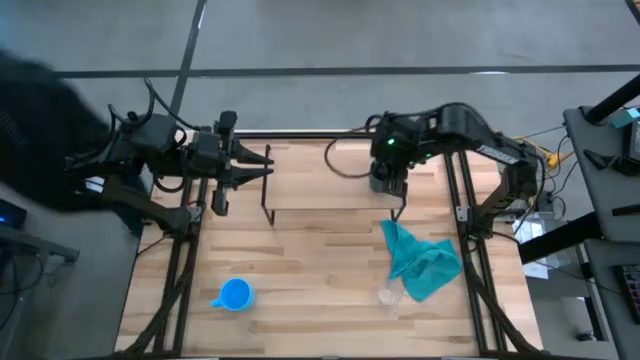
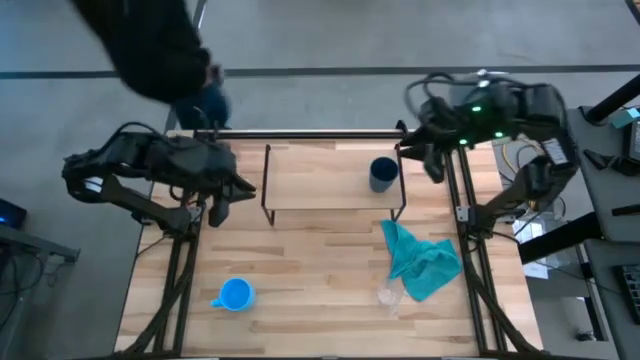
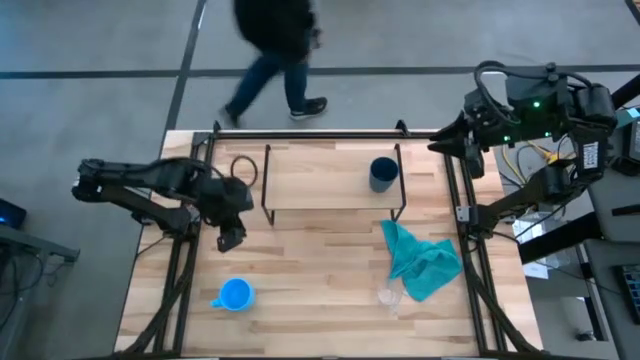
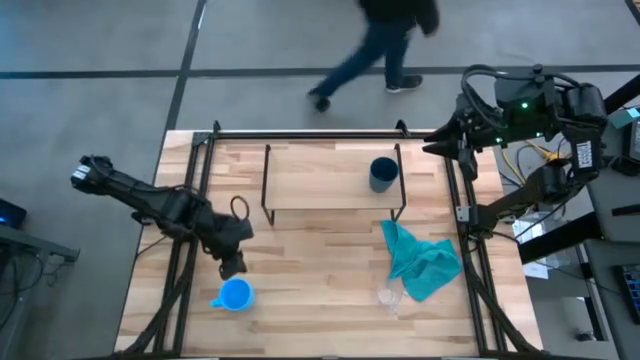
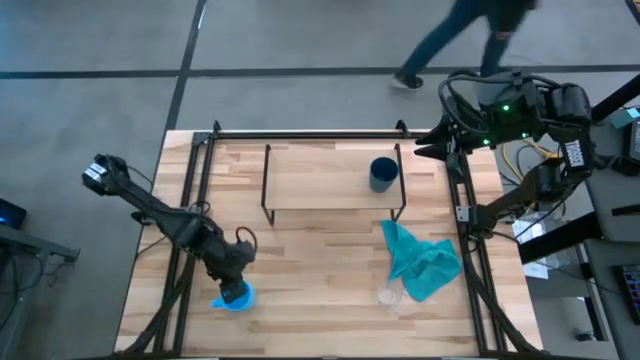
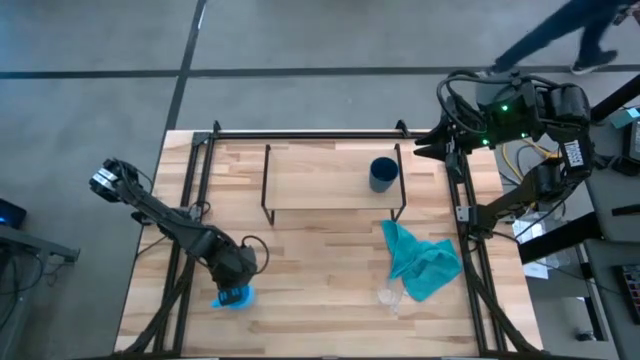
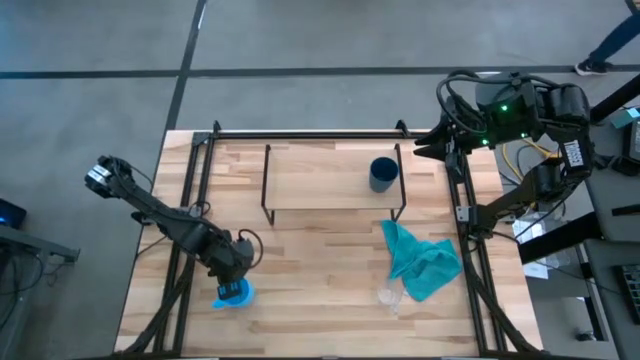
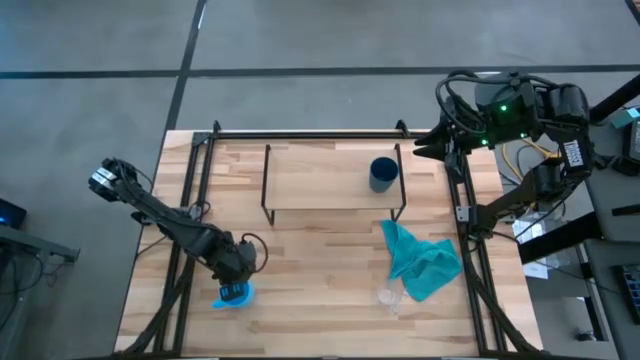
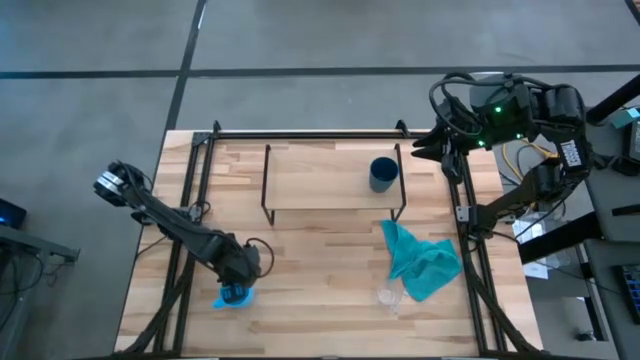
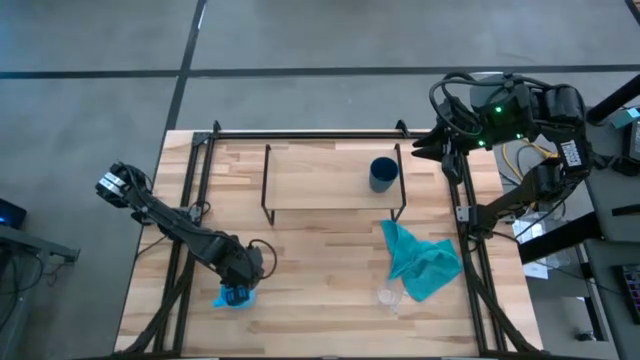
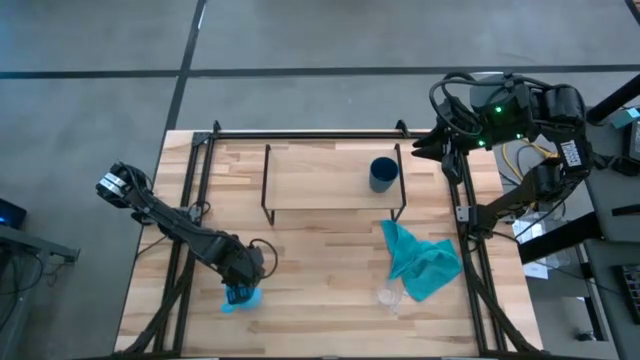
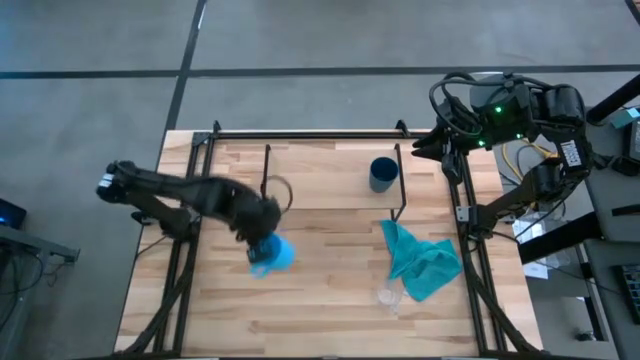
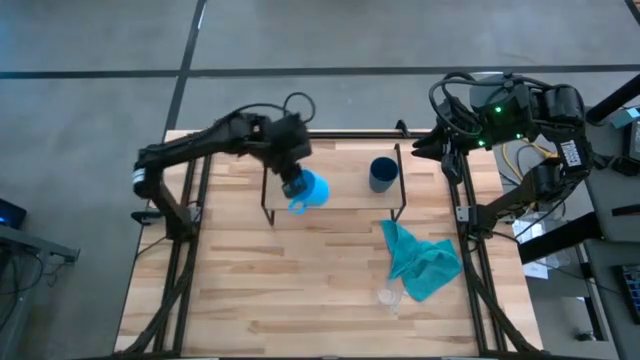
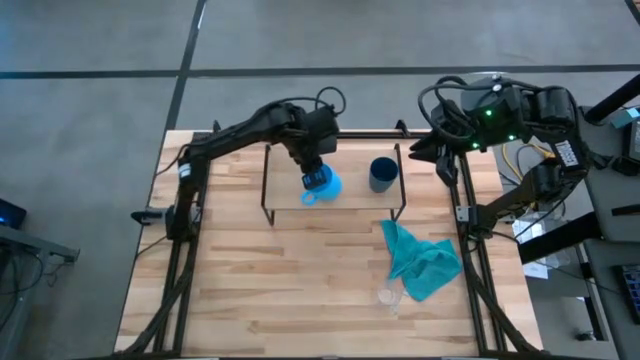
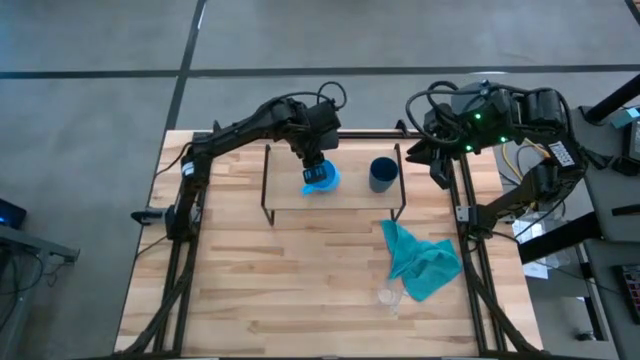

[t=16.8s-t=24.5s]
Task: Stack small to large cups/mugs on shelf
Put the light blue mug on the shelf

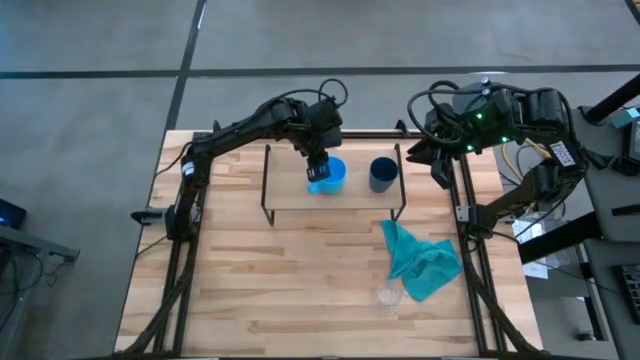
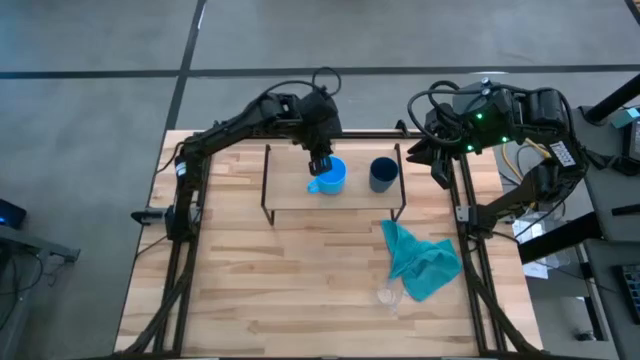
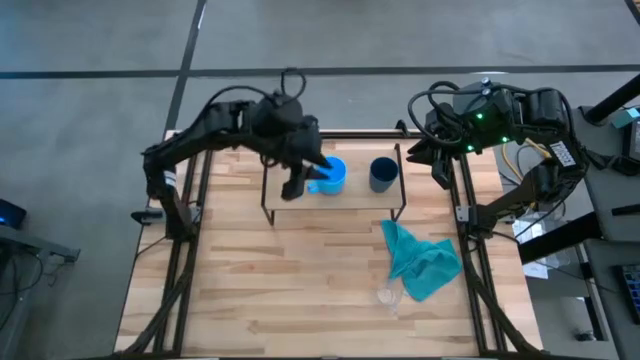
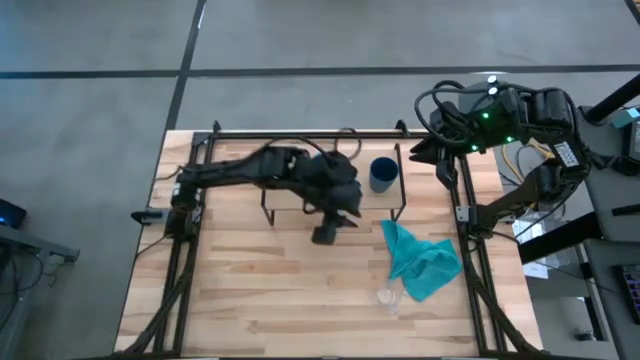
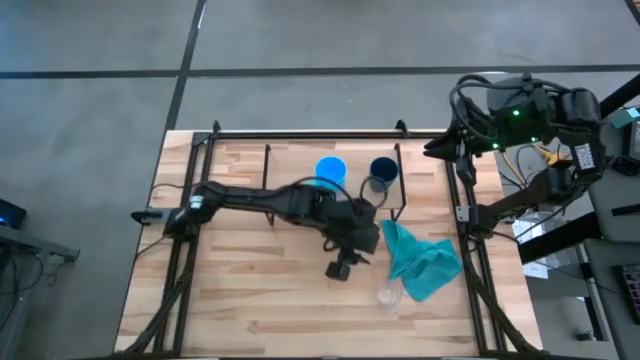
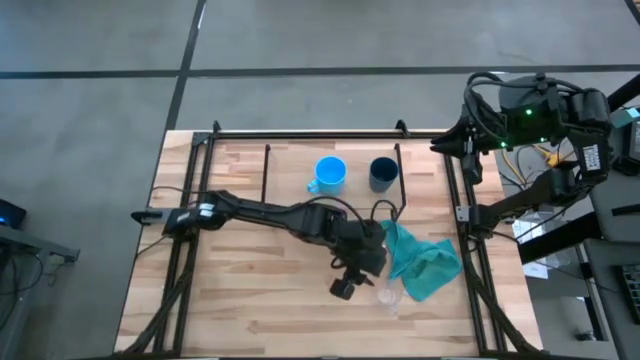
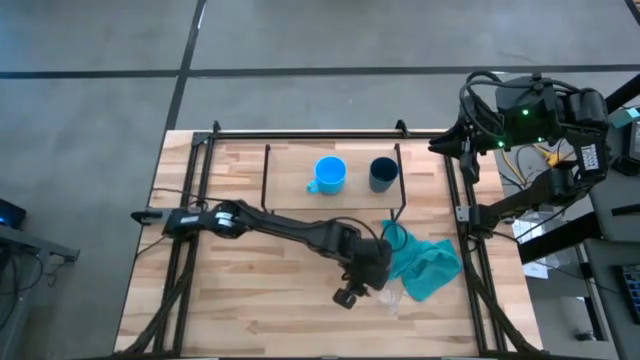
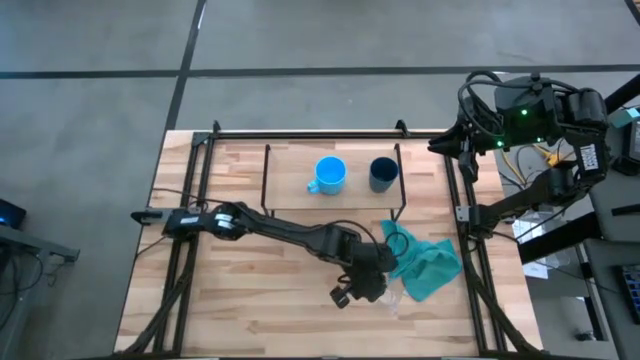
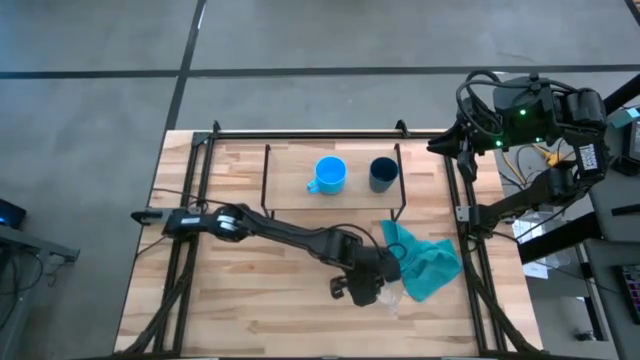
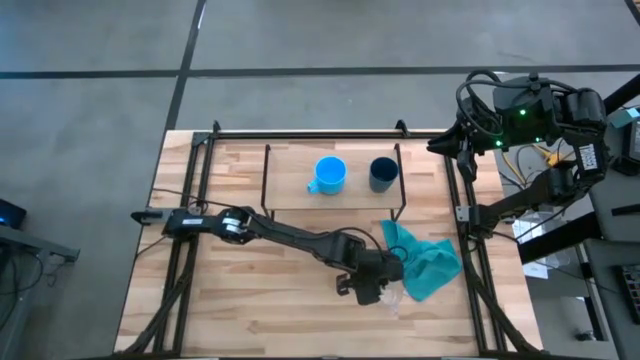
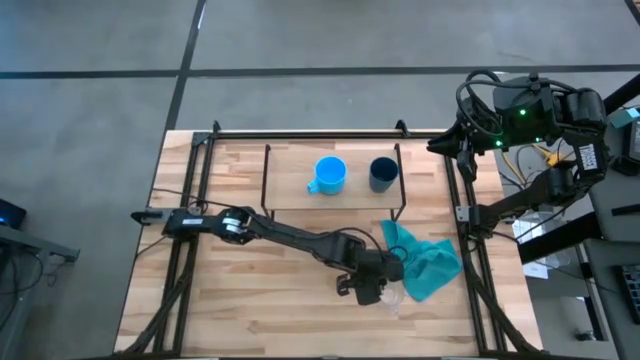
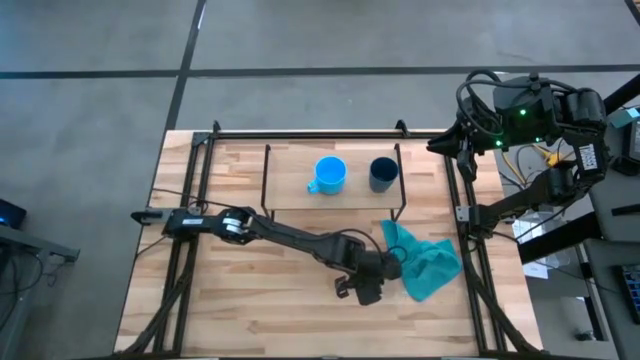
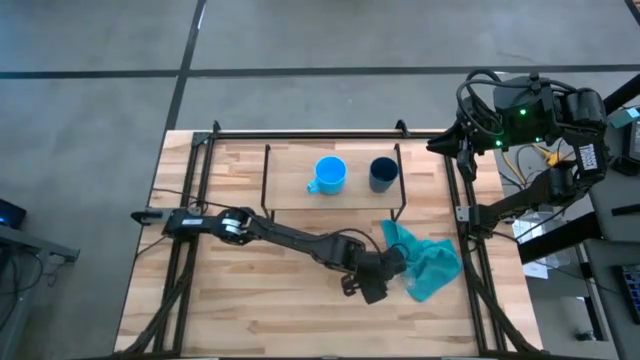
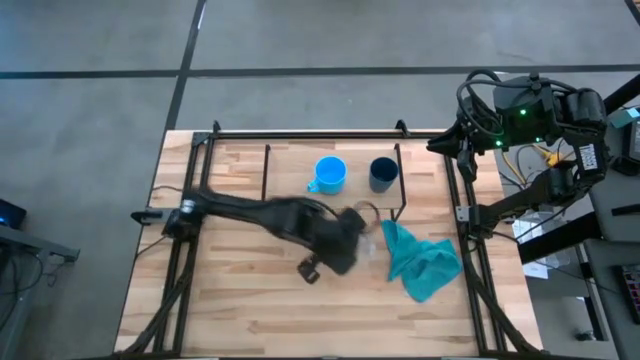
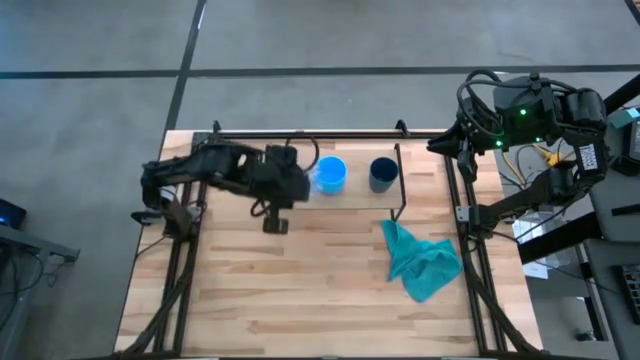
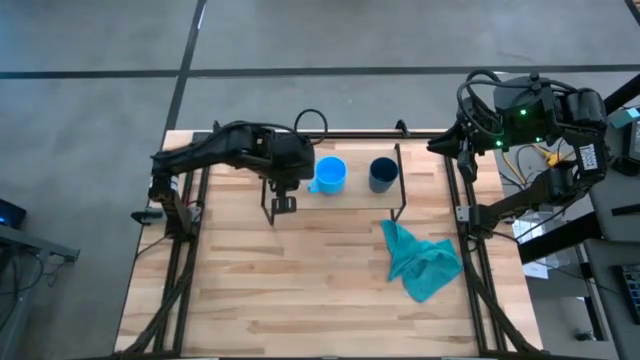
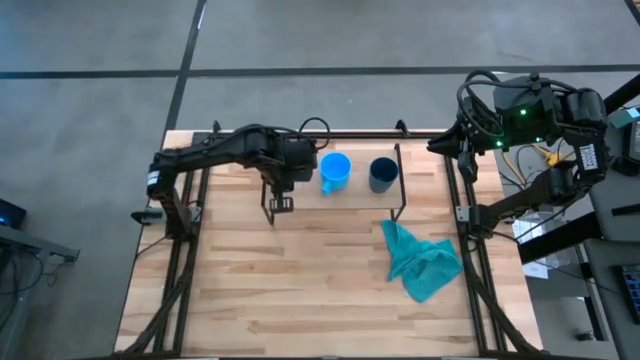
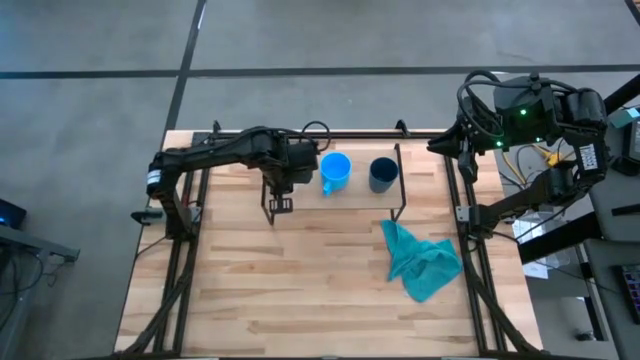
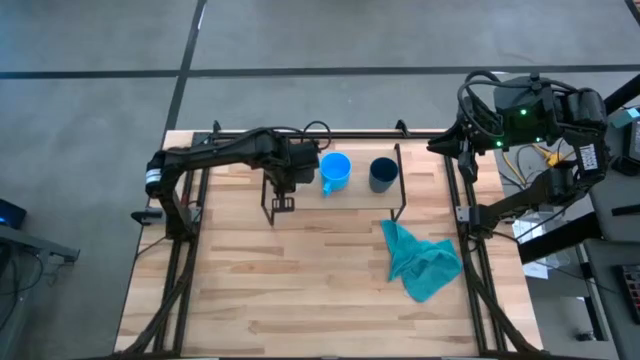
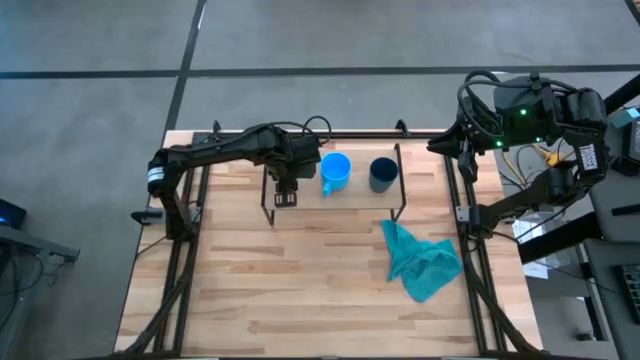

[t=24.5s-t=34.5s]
Put the transparent mug on the shelf

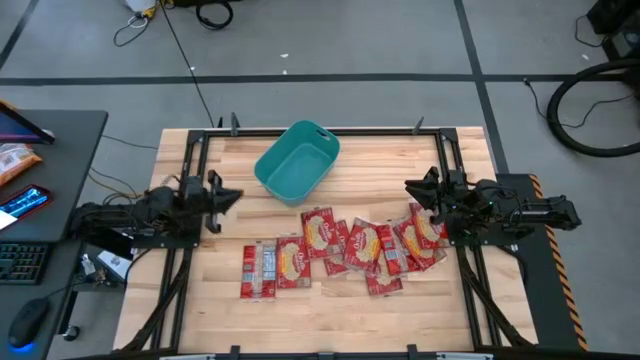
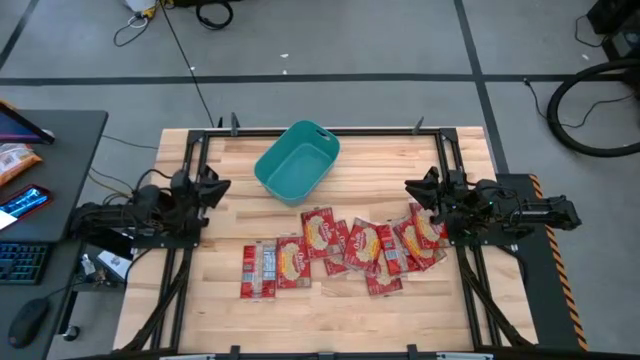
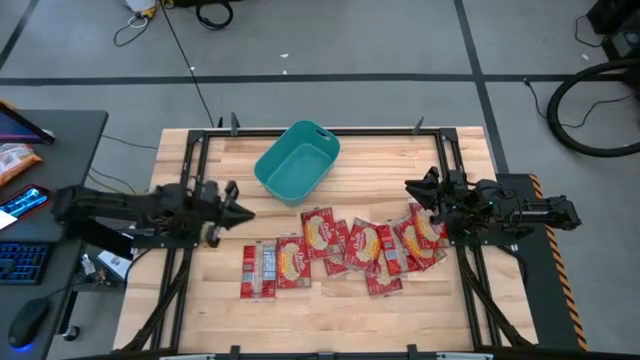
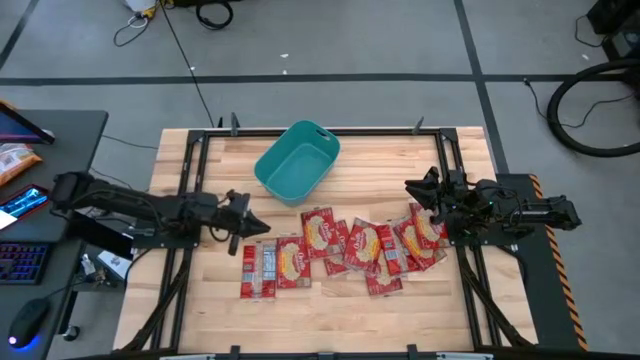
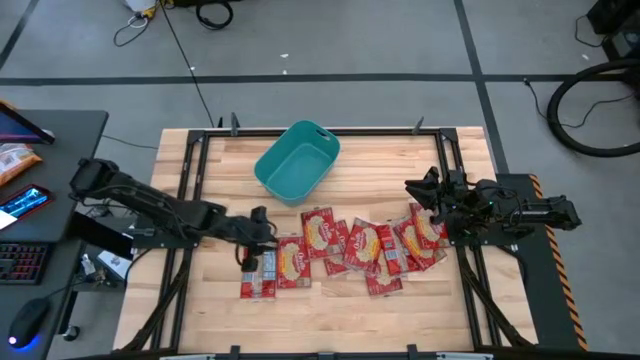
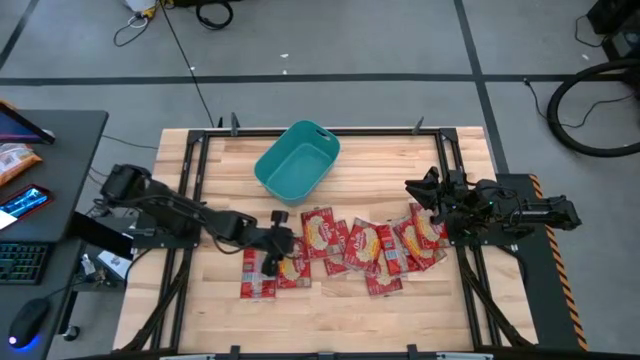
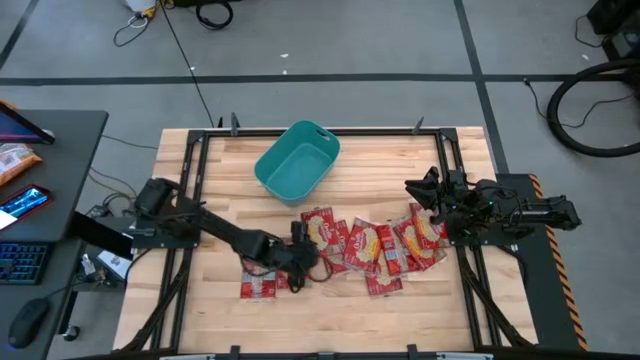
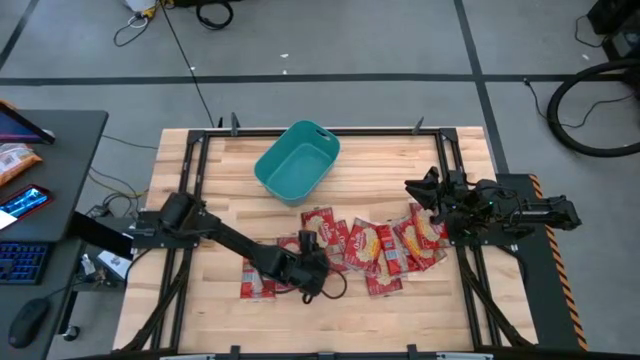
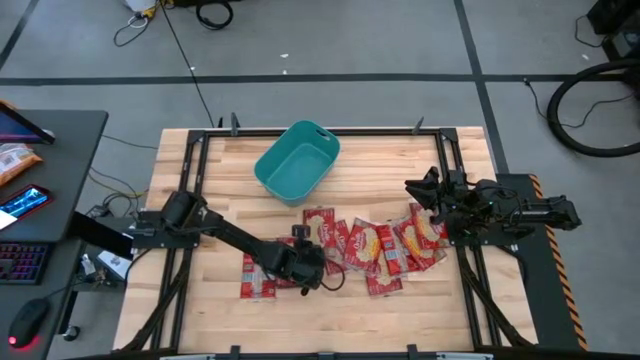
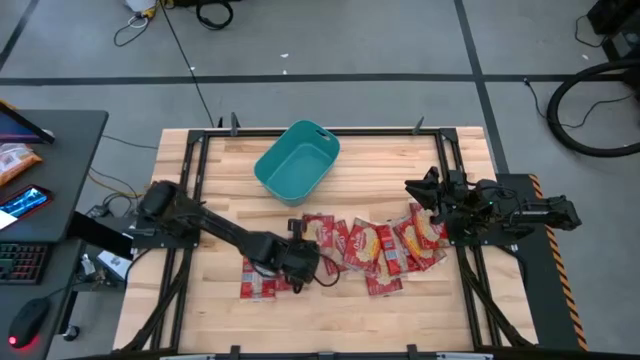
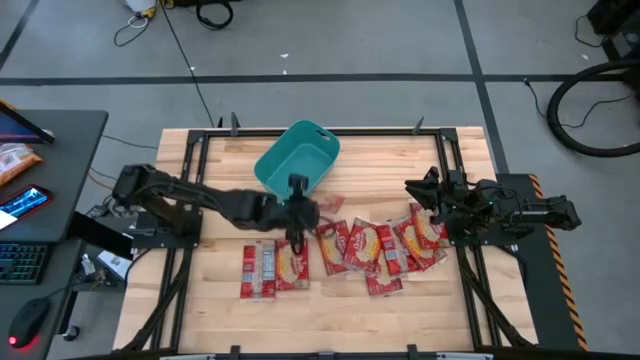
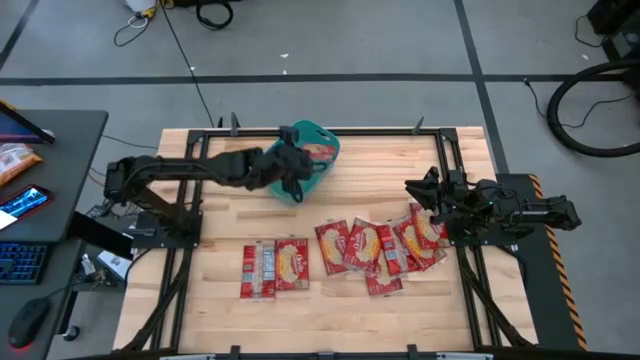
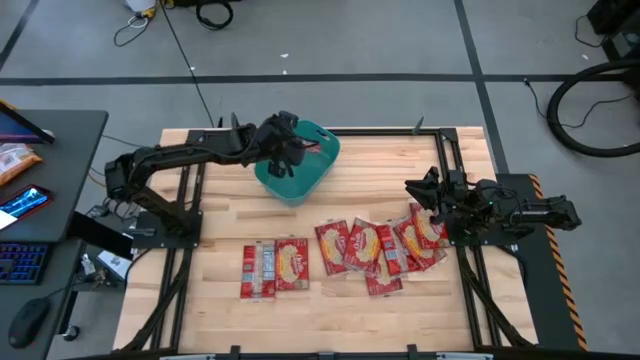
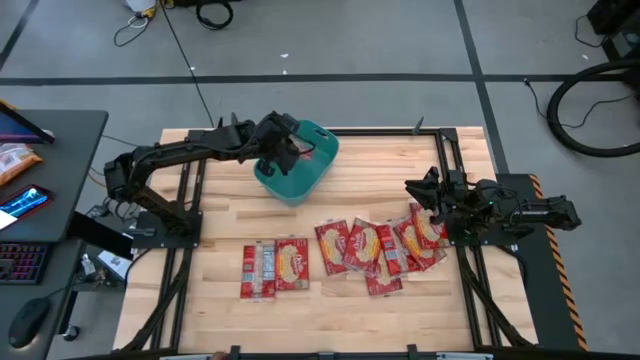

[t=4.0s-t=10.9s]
Task: Sort popcorn bags into baskets
Put the red popcorn bag into the blue bin
